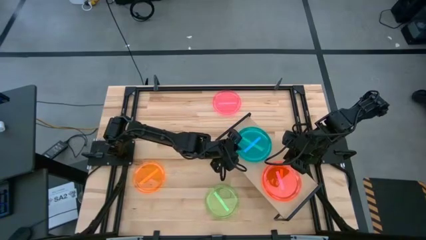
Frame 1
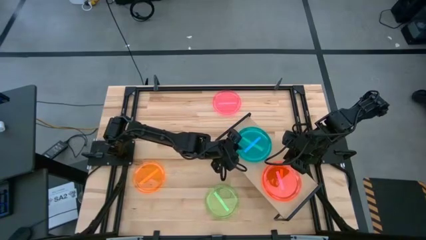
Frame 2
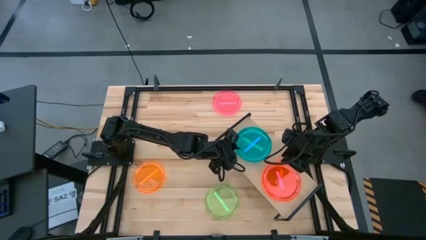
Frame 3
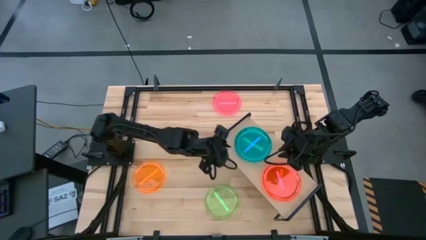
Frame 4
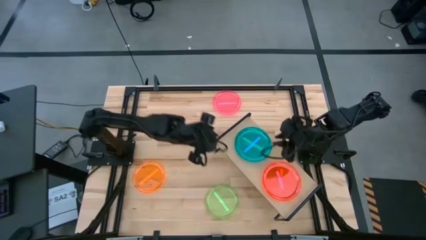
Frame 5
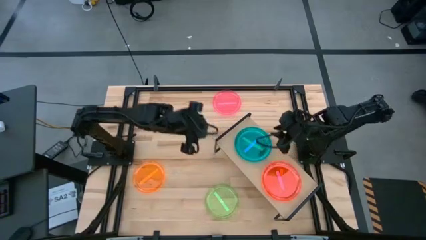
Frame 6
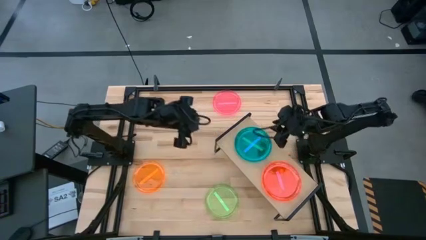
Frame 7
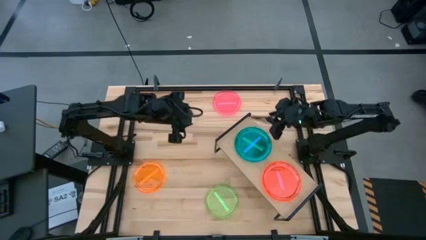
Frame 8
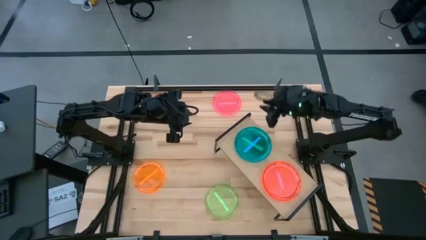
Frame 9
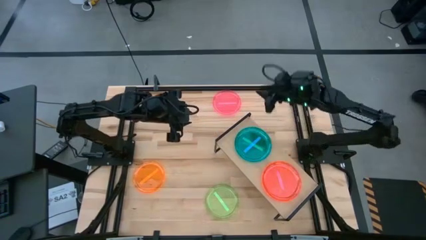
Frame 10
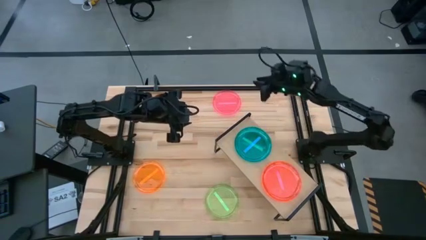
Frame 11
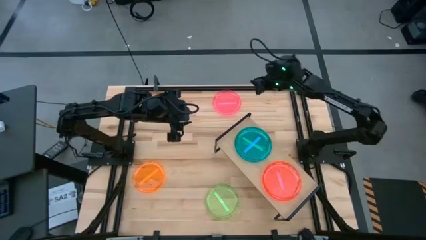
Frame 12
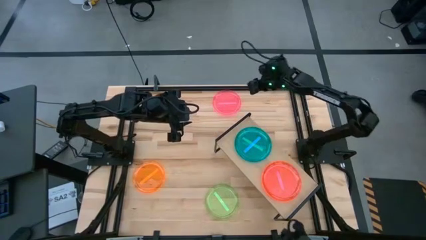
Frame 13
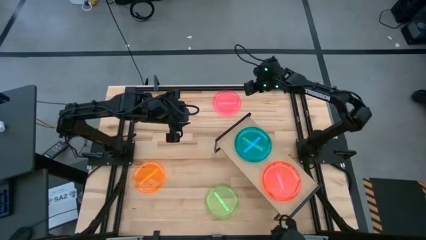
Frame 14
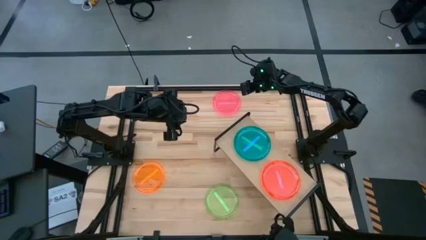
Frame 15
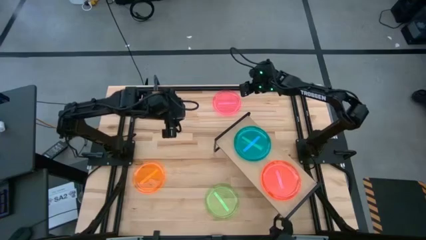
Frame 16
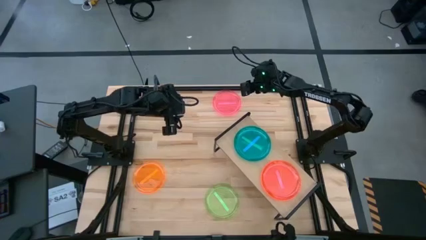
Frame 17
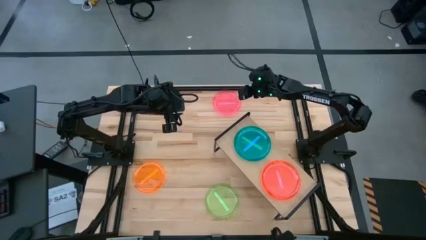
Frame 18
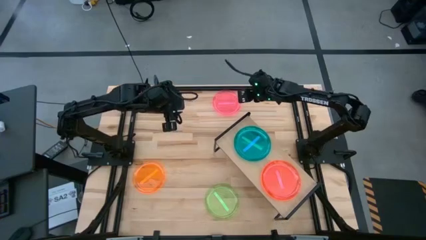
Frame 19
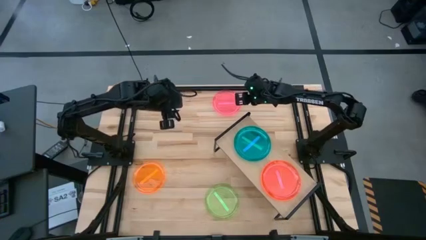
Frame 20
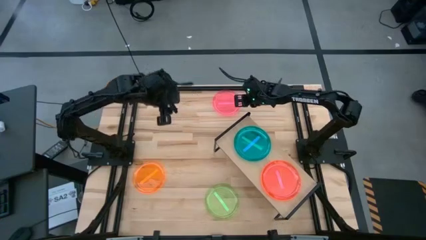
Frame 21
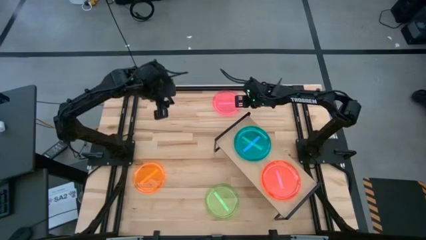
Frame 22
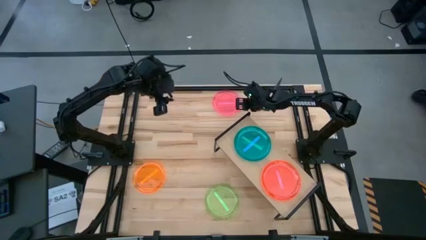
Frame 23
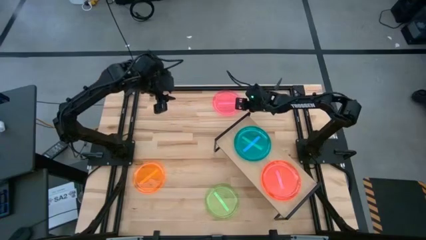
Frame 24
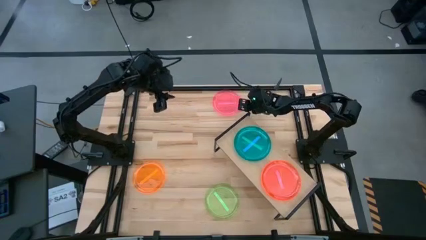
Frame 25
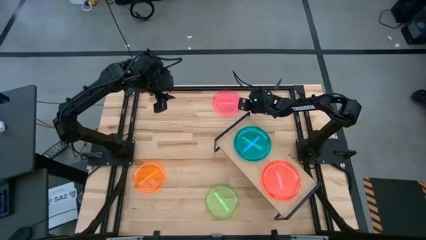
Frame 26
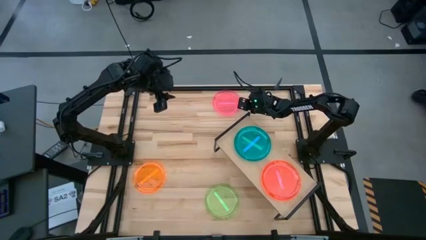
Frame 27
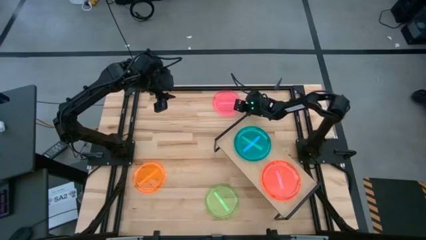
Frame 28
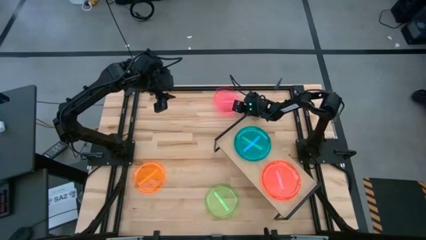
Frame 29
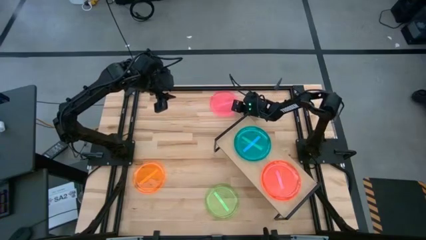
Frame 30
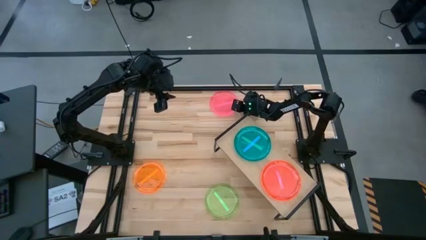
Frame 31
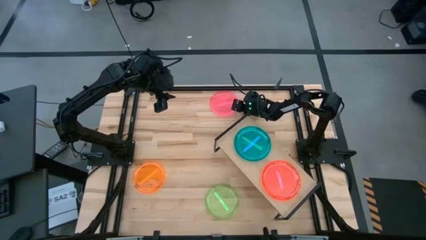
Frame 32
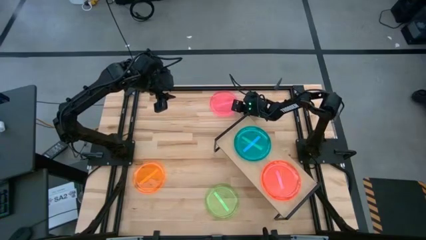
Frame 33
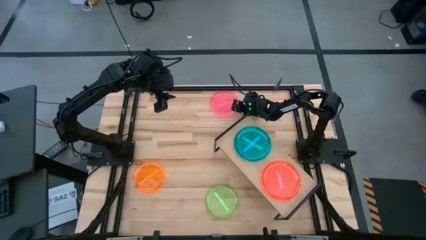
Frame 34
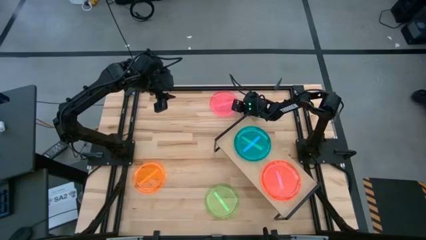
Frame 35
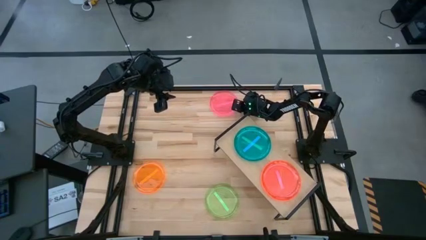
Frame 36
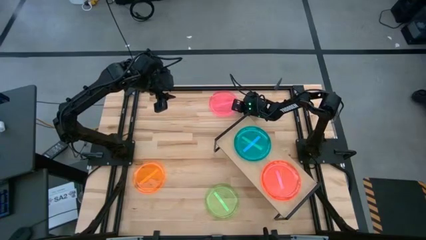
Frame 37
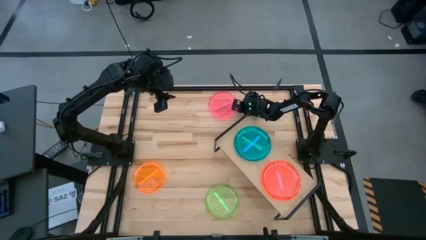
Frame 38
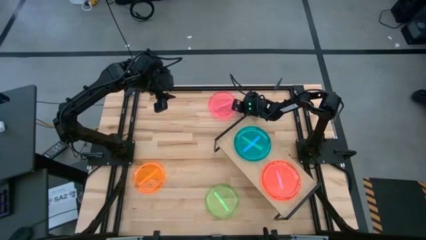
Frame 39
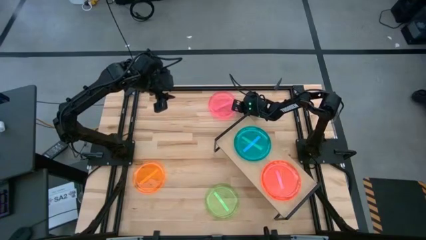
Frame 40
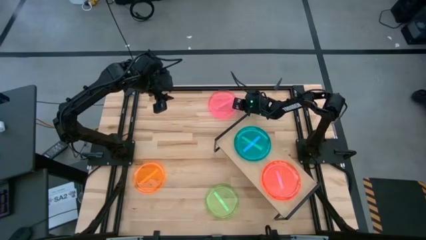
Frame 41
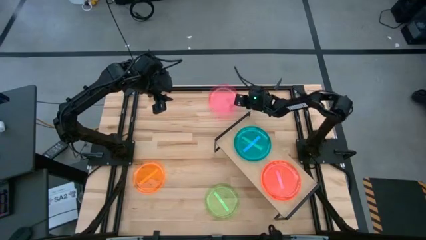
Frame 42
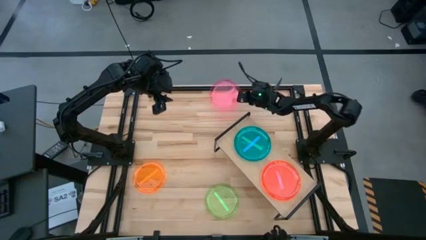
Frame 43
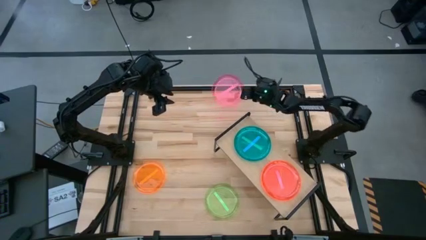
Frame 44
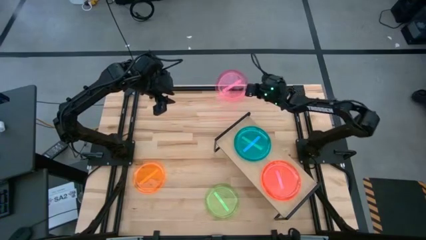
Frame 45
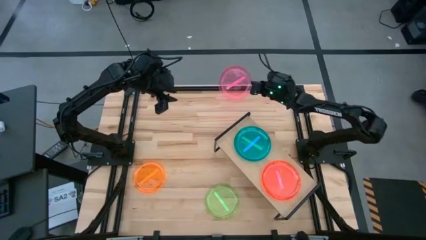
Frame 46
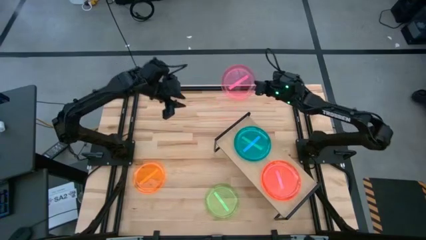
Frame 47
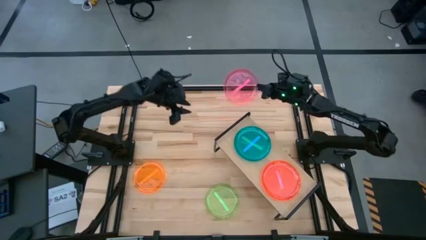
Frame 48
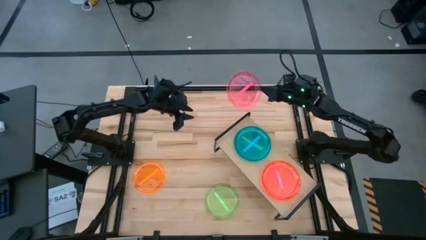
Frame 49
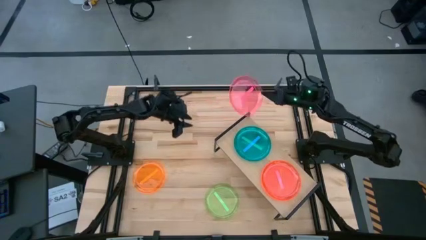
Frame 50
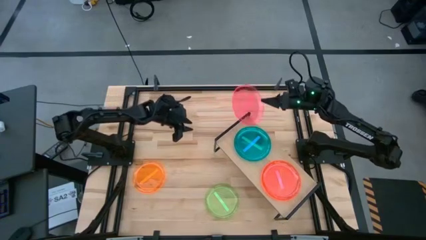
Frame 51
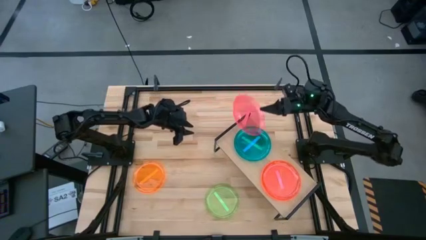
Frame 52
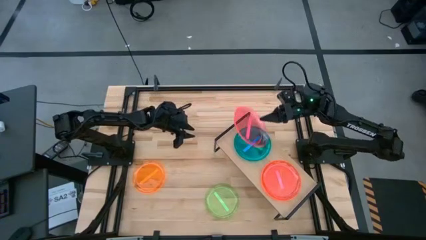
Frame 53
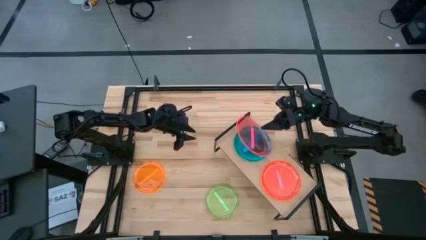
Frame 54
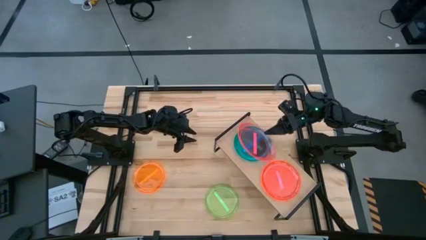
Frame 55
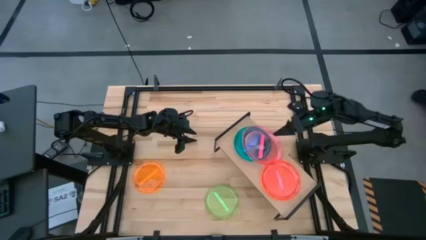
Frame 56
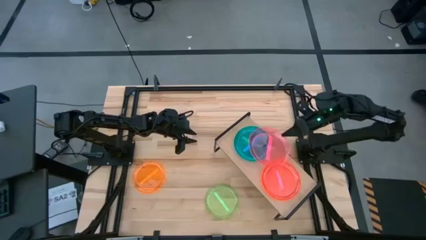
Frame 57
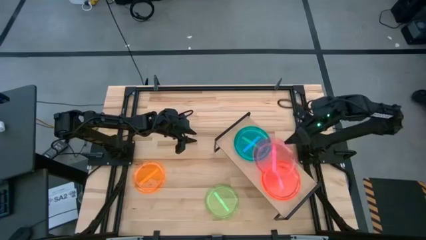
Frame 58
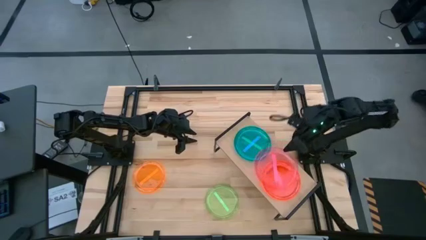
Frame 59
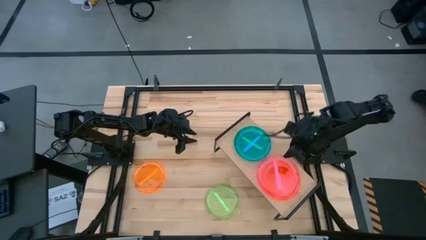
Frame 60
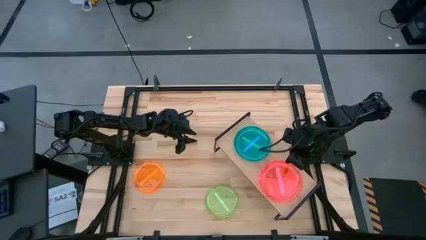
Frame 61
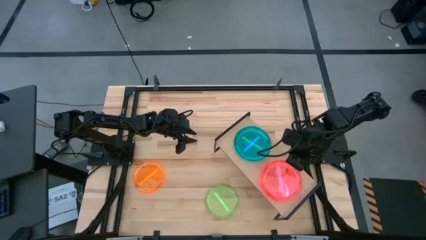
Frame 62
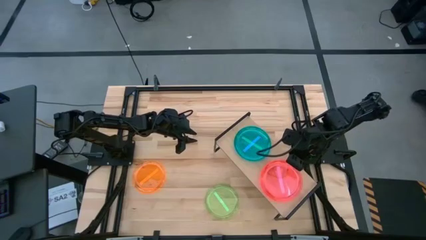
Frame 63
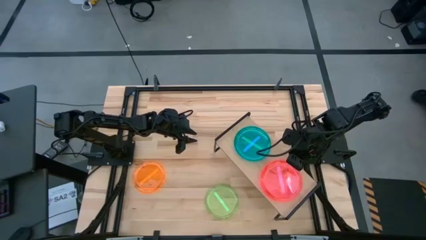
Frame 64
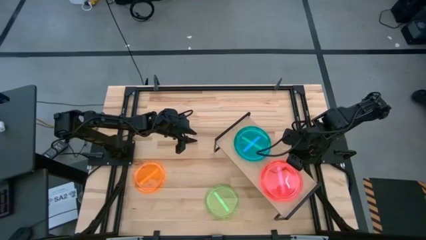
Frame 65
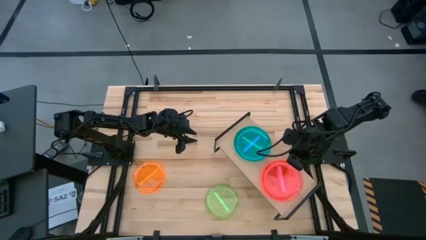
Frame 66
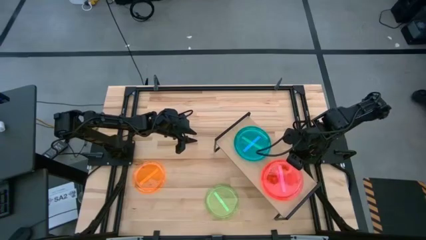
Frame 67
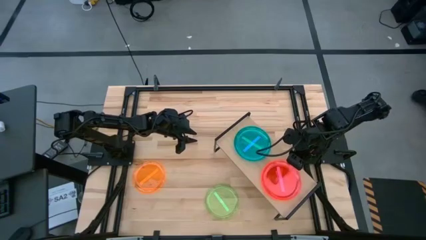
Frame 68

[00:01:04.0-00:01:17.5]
Task: Place and stack plates onto a shelf
Stack the pink plate on top of the other pink plate on the shelf

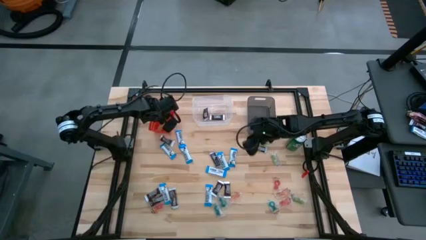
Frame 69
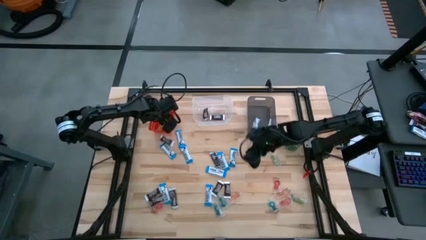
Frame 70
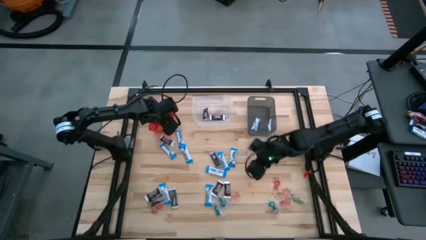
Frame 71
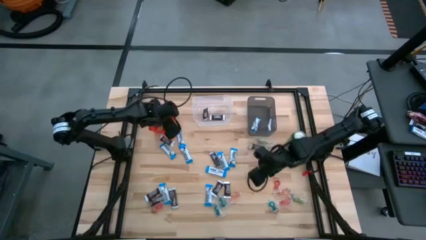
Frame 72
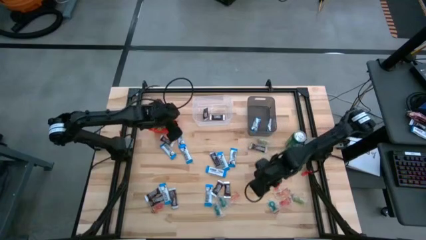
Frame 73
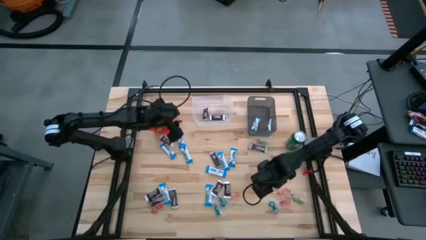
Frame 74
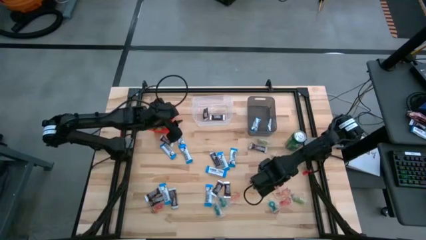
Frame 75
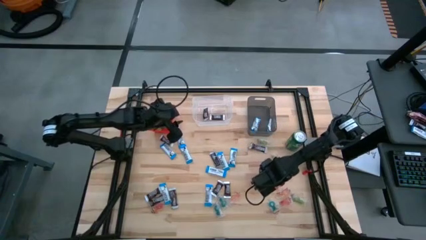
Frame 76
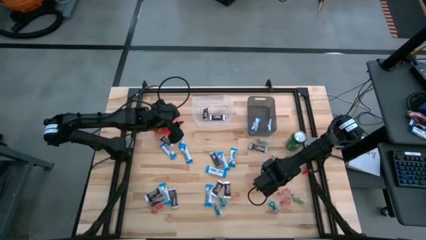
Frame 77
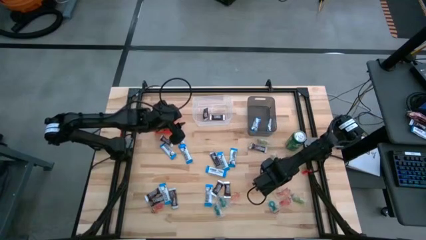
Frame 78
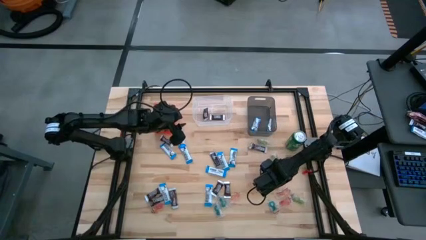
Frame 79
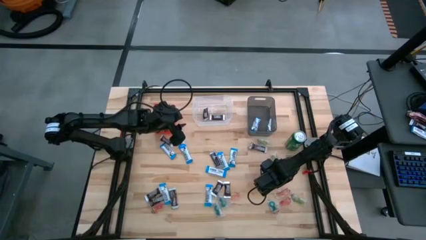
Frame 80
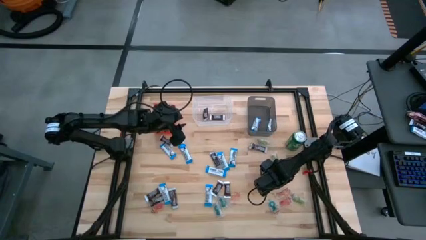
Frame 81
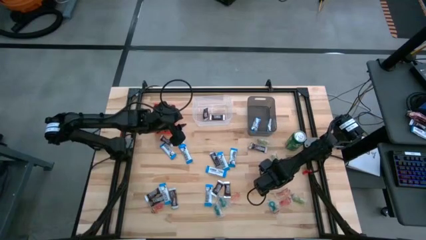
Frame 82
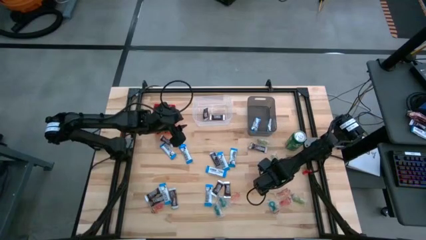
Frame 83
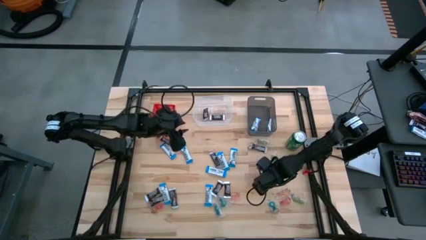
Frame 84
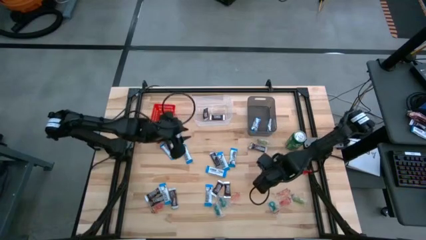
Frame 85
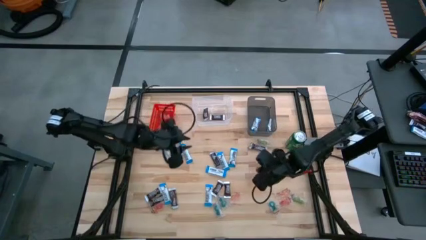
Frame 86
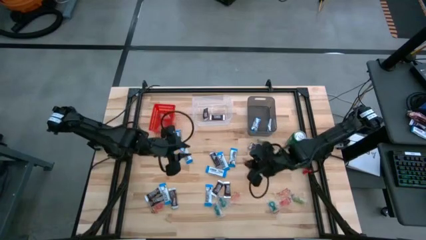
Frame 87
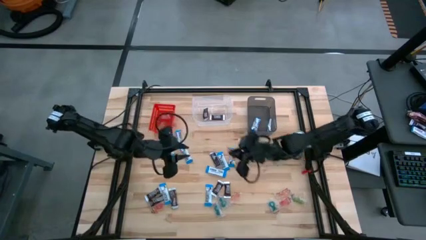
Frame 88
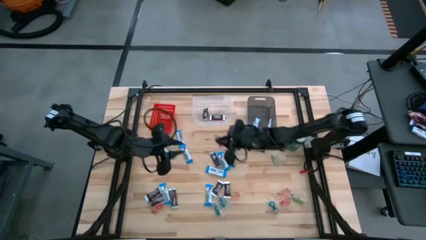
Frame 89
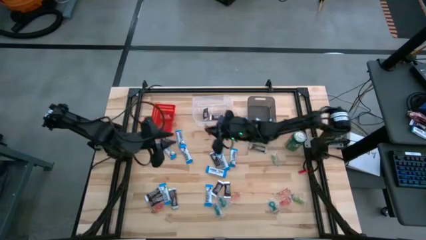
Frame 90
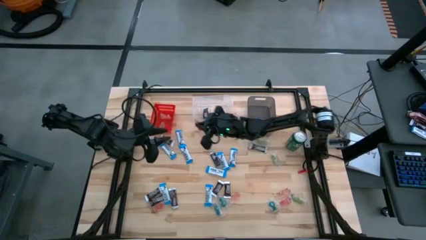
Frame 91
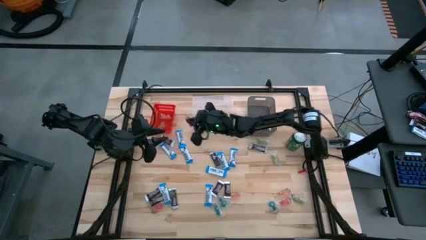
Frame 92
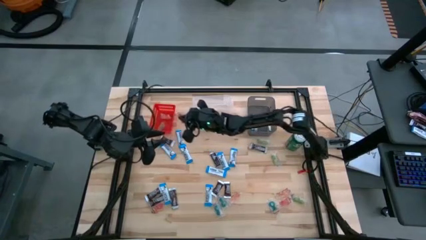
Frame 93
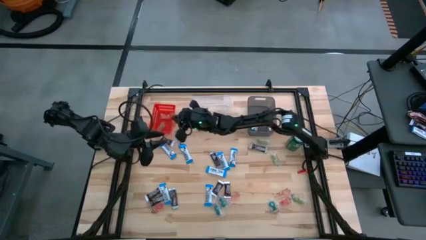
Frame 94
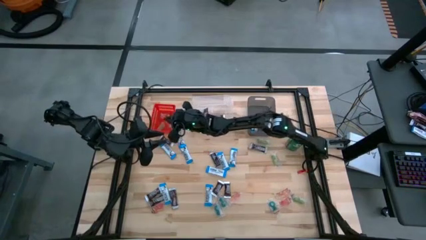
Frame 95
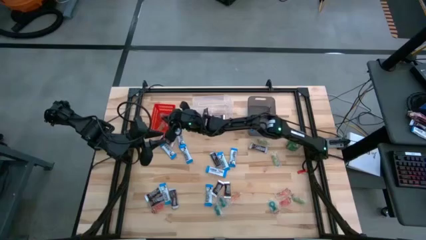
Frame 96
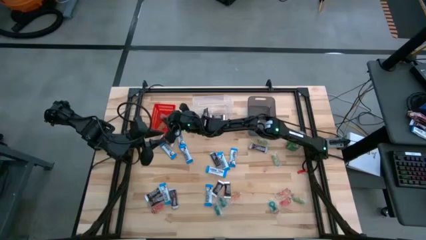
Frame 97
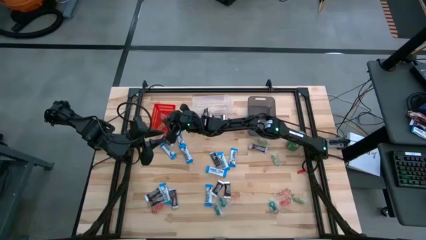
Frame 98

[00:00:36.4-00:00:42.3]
Task: Sort candy
Put the red candy into the red bin
